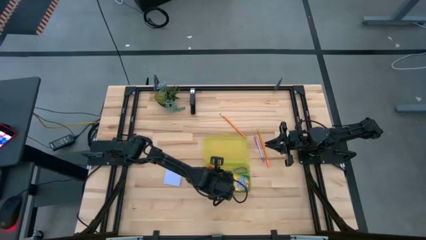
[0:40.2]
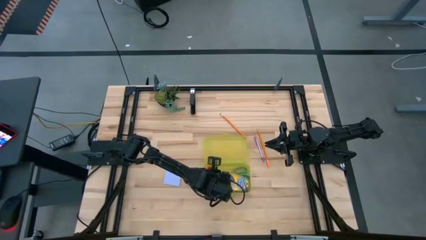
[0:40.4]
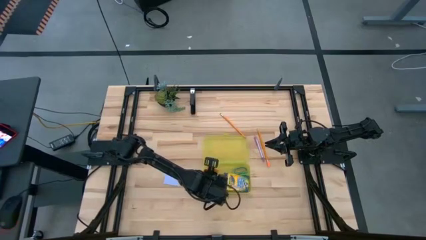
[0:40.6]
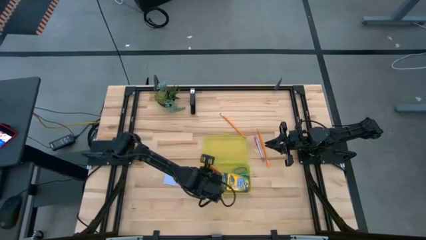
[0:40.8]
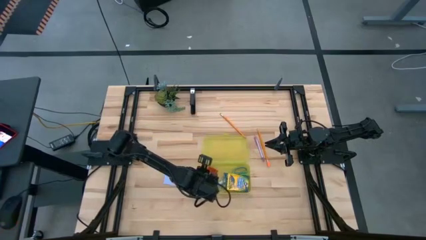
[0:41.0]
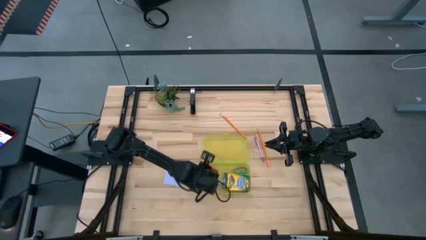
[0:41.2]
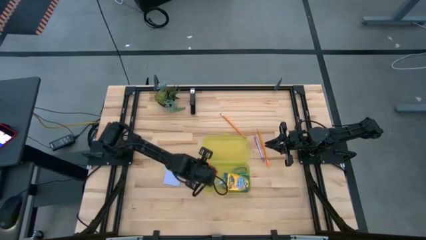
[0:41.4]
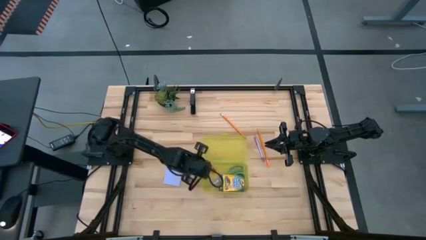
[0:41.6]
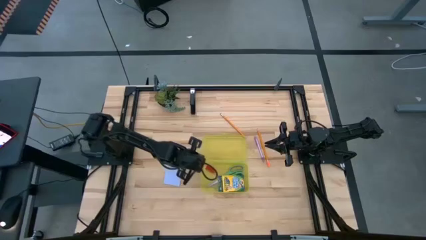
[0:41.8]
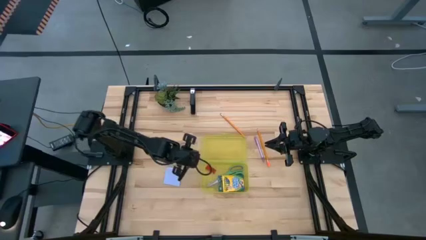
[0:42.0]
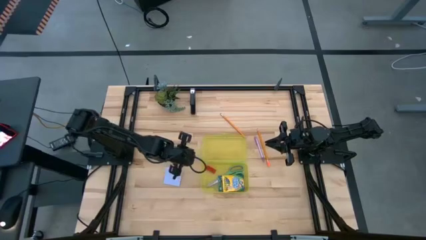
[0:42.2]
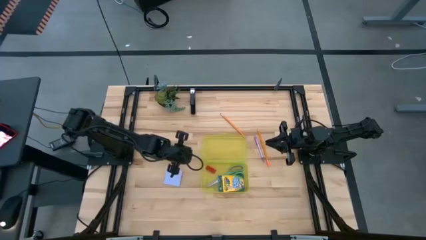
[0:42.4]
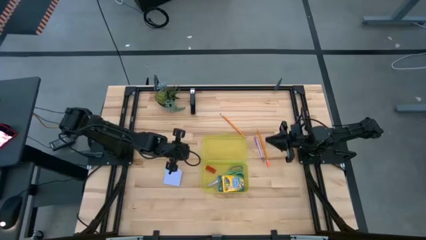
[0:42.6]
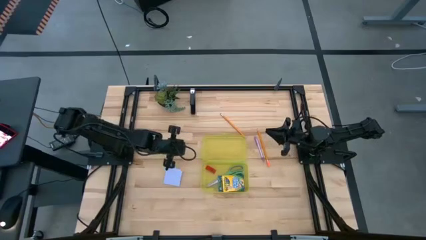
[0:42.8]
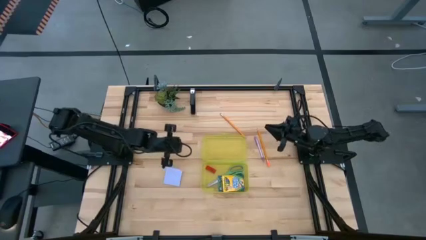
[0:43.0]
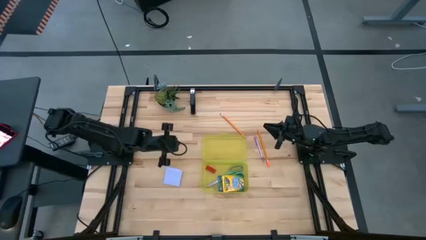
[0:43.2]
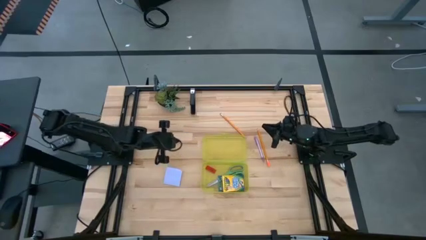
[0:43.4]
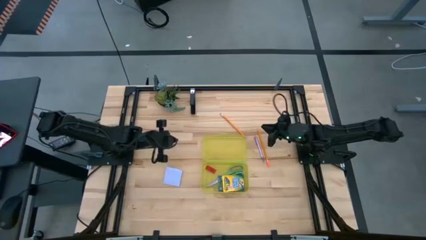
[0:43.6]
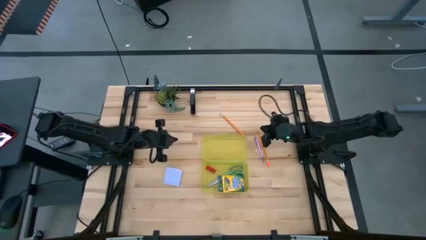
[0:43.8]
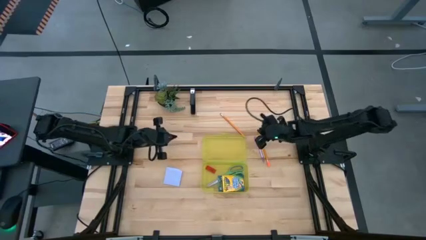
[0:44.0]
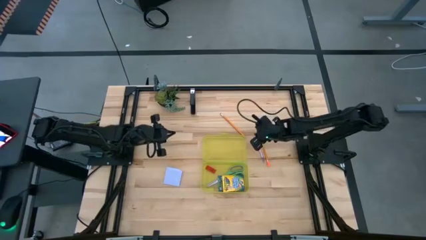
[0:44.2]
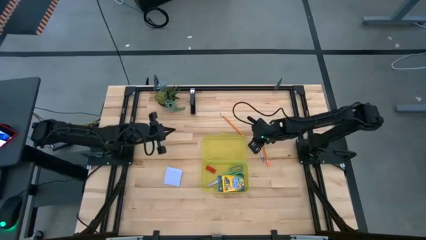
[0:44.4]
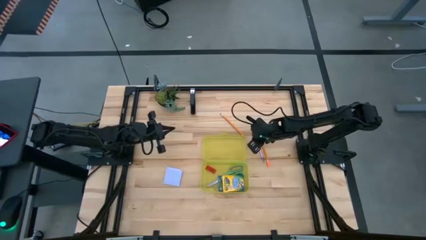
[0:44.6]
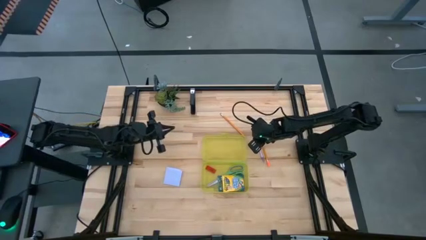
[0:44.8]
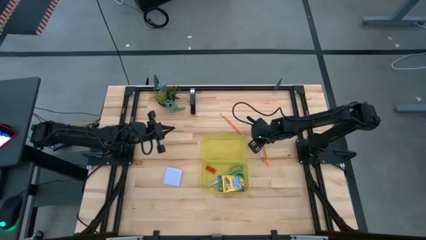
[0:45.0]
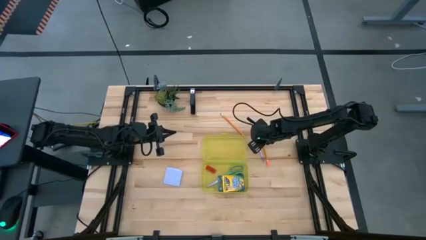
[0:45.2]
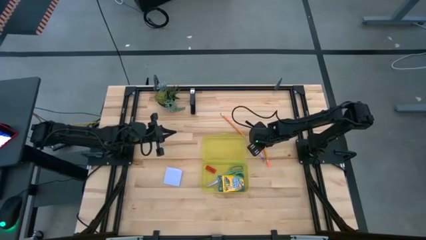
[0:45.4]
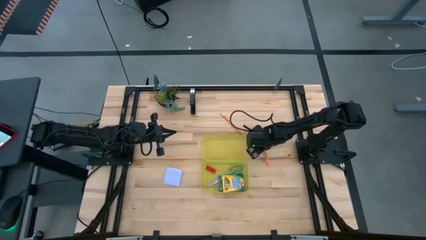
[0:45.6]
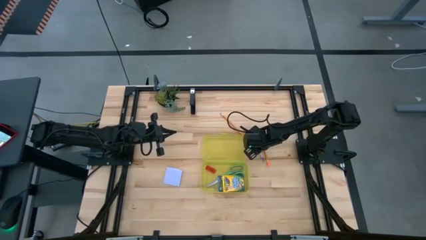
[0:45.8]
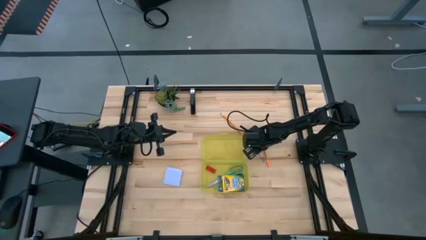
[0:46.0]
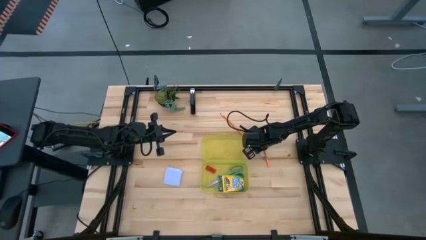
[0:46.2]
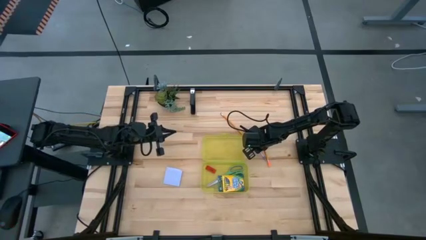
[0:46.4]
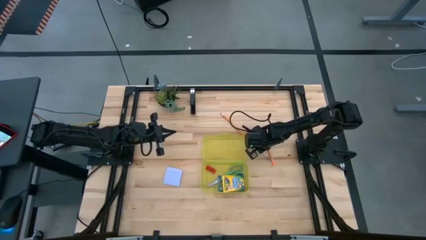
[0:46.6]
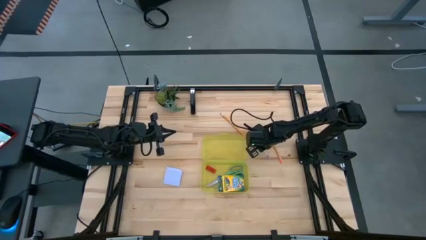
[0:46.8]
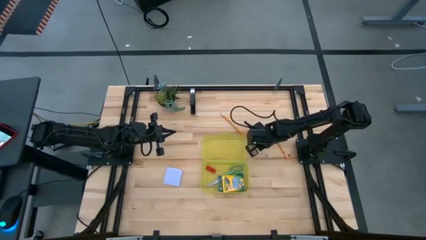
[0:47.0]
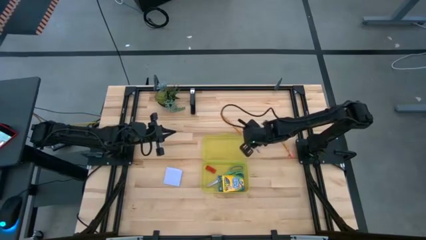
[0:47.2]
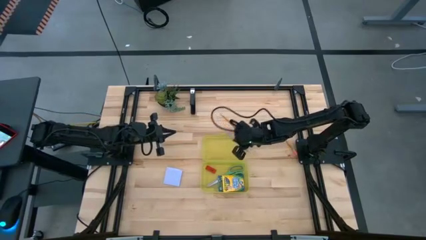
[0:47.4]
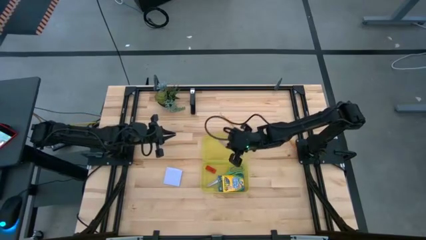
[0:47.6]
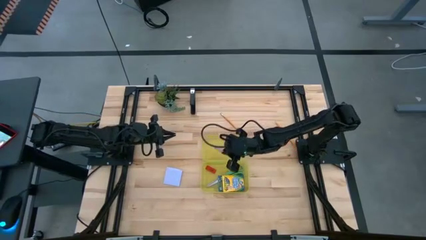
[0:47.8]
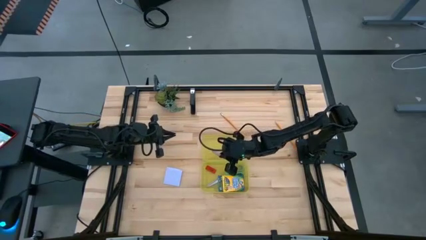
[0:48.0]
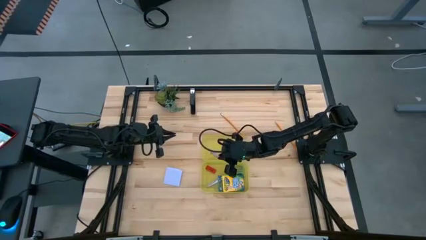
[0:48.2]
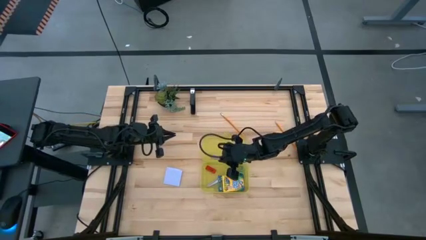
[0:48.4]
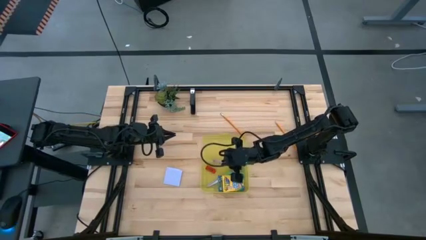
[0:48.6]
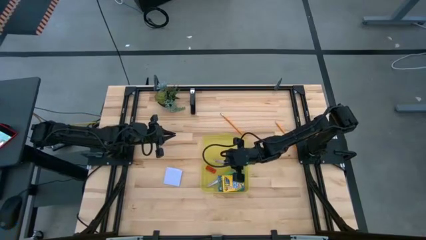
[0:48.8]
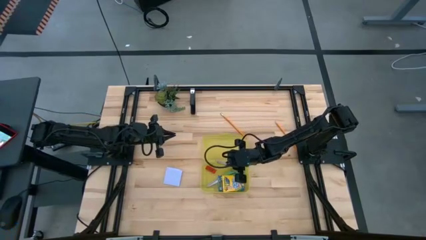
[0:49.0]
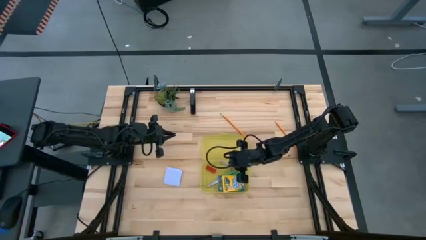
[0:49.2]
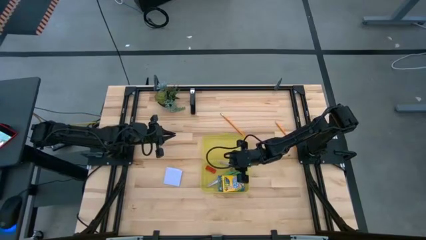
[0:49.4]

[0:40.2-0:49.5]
Task: Pack school essentials
Put the light pink pen into the yellow supply box

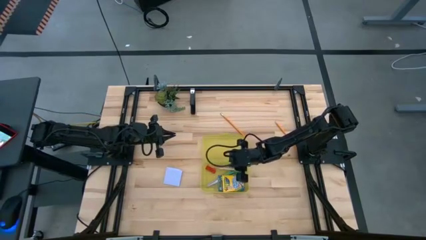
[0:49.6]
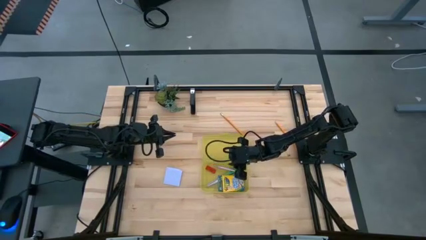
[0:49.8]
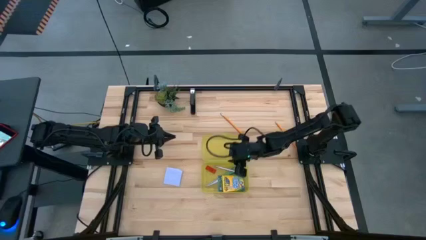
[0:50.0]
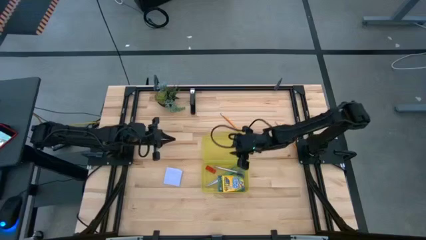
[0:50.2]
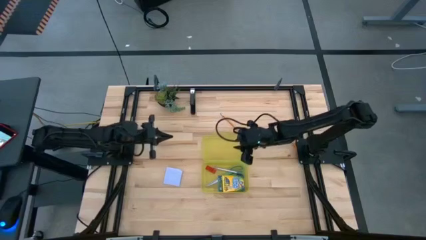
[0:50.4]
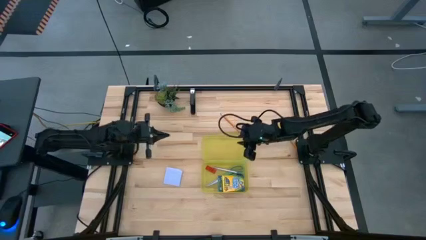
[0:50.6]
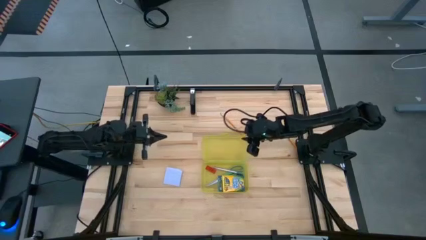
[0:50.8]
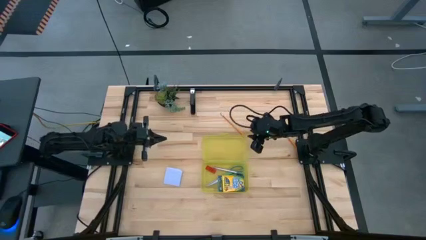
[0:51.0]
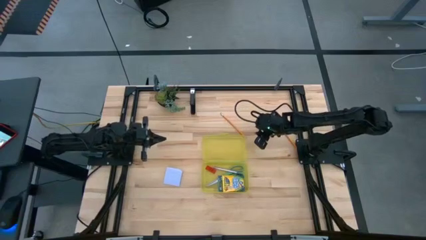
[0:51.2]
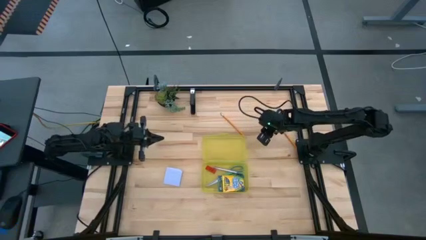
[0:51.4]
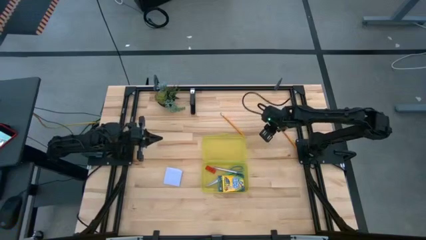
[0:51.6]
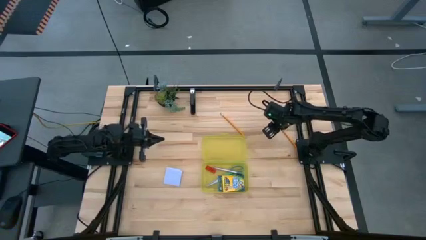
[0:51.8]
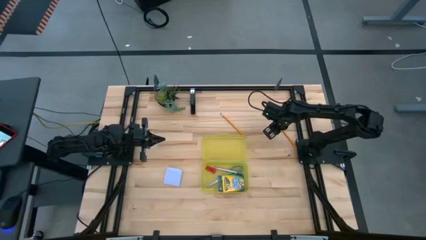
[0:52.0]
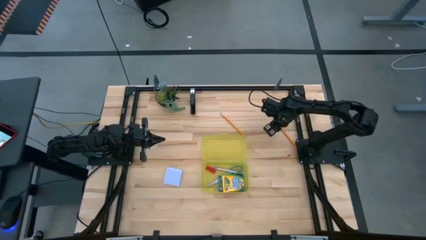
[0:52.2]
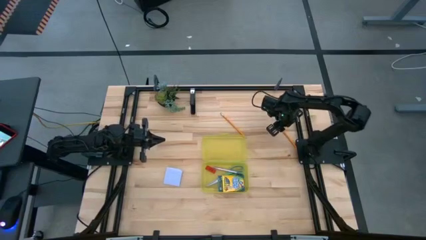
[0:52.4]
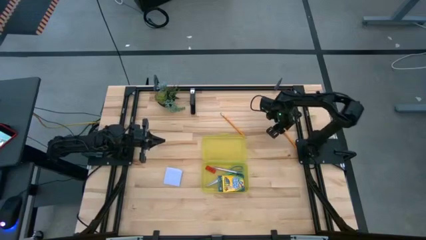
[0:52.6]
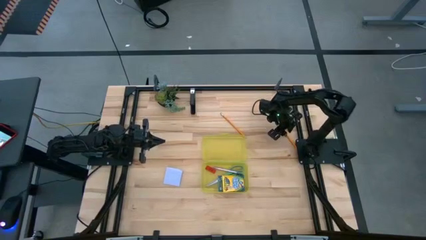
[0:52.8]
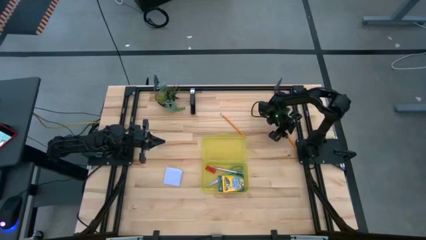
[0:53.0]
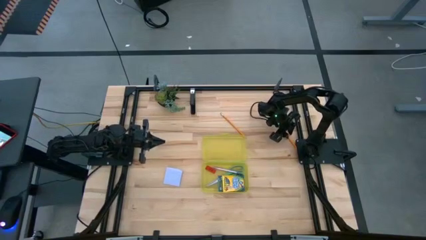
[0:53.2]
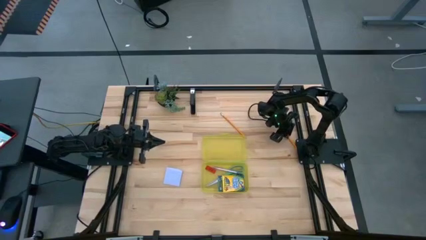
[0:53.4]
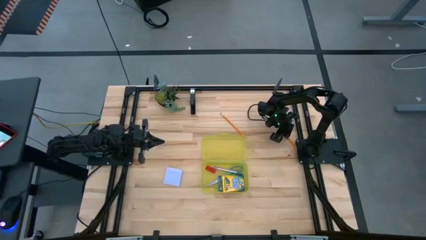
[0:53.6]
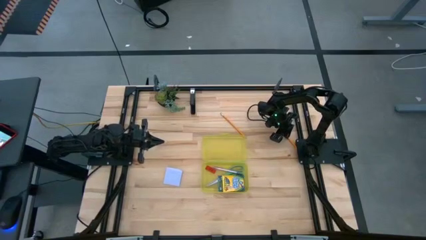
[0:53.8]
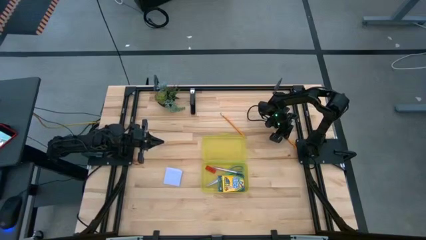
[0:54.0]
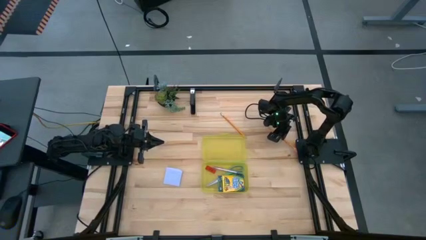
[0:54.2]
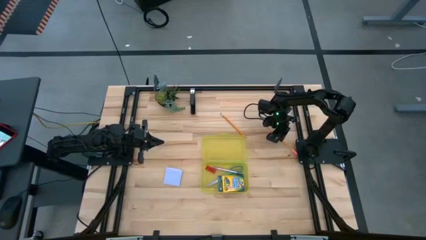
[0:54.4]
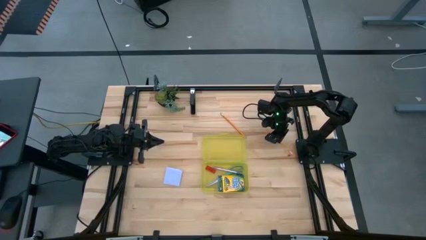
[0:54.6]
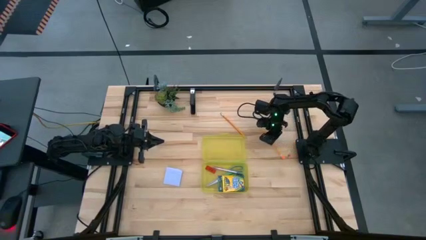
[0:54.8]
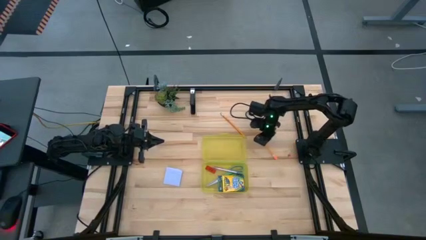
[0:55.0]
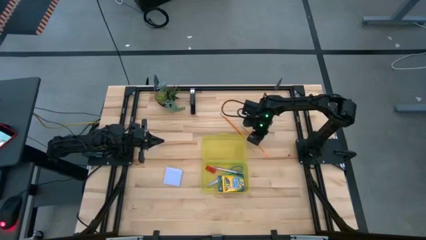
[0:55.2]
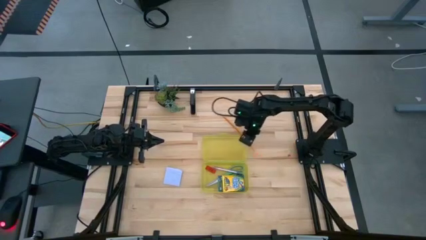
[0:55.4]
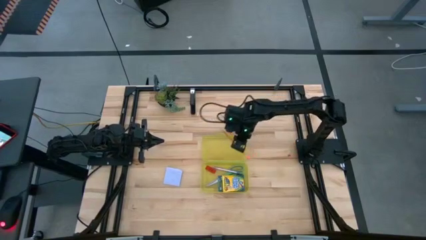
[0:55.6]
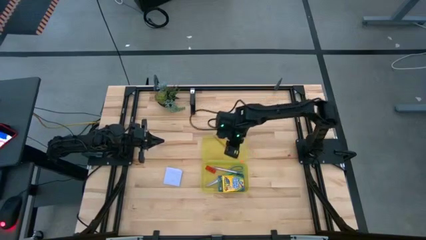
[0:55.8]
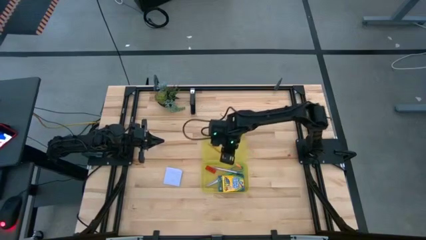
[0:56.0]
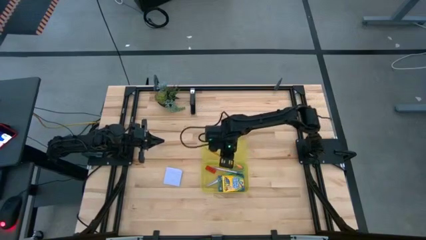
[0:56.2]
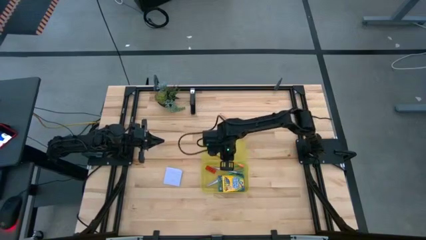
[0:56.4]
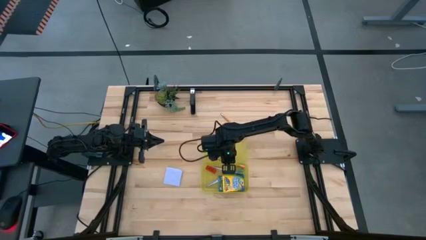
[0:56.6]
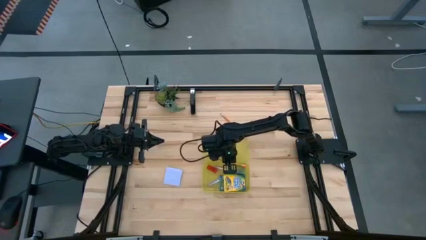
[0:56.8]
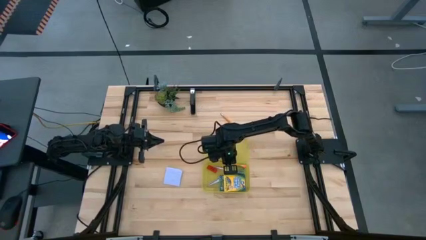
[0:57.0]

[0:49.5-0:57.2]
Put the right yellow pencil into the yellow supply box
